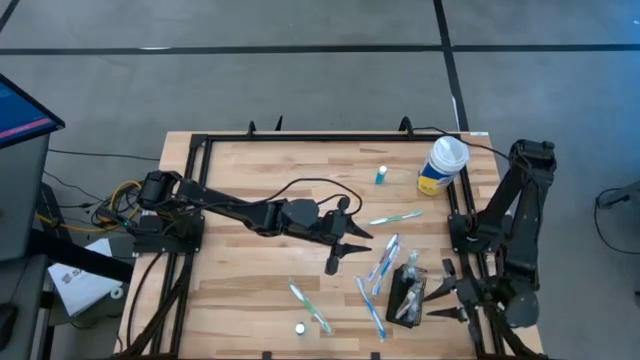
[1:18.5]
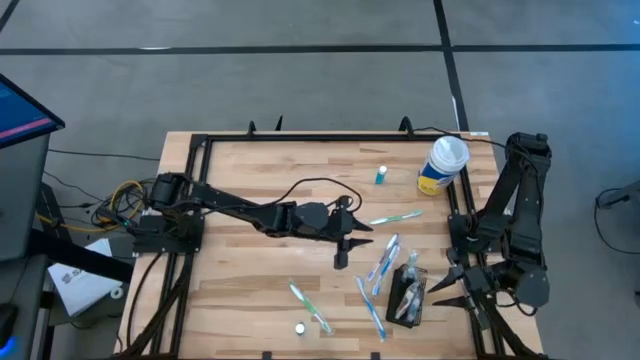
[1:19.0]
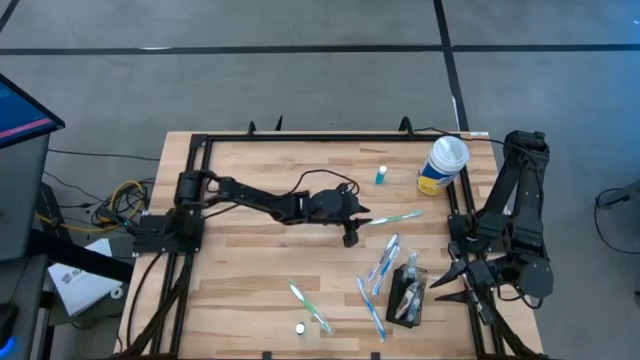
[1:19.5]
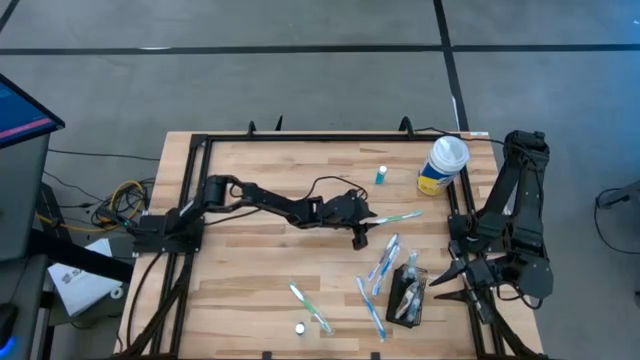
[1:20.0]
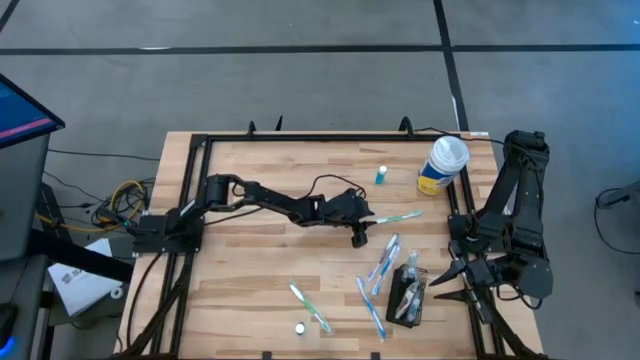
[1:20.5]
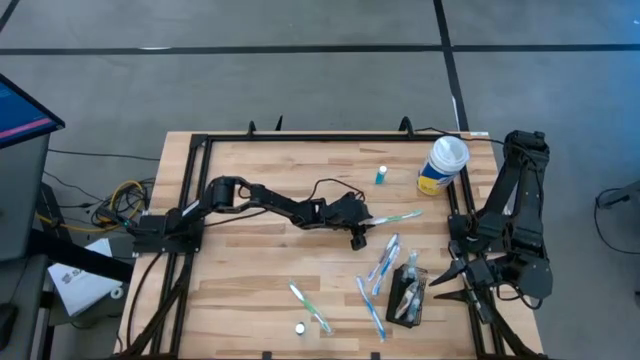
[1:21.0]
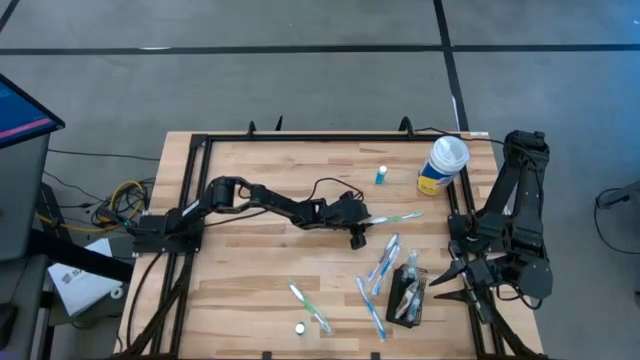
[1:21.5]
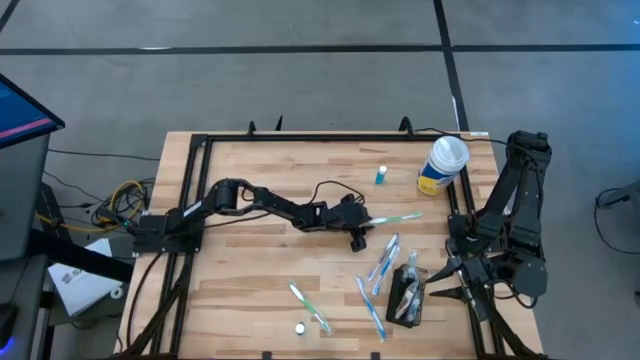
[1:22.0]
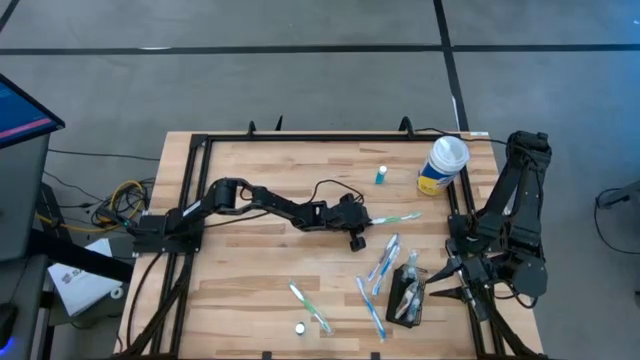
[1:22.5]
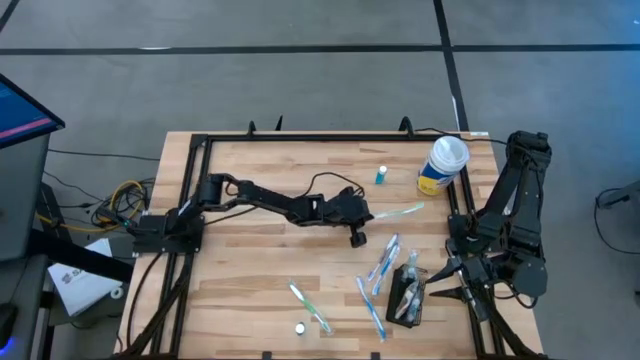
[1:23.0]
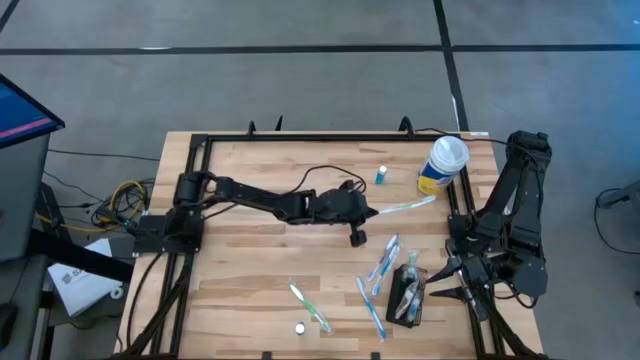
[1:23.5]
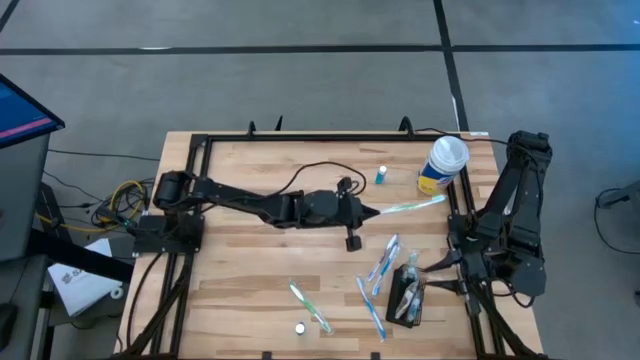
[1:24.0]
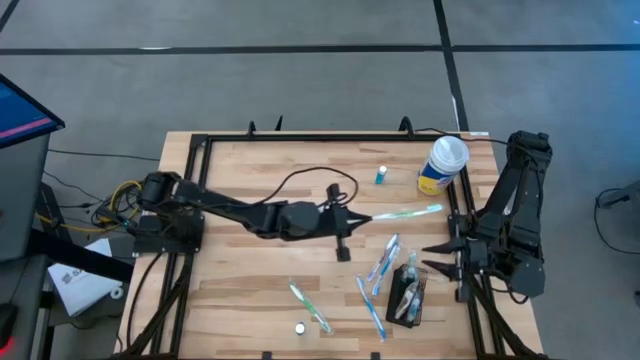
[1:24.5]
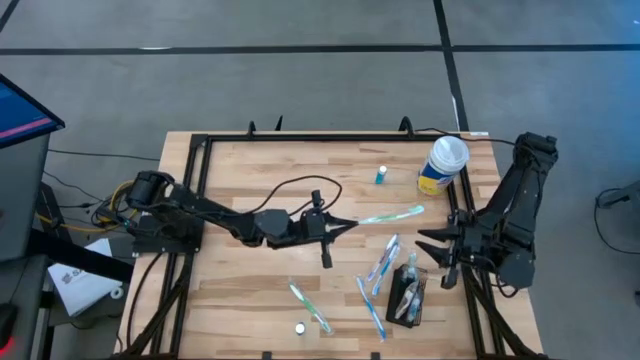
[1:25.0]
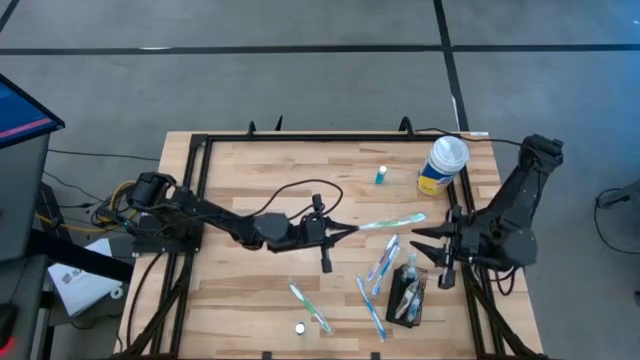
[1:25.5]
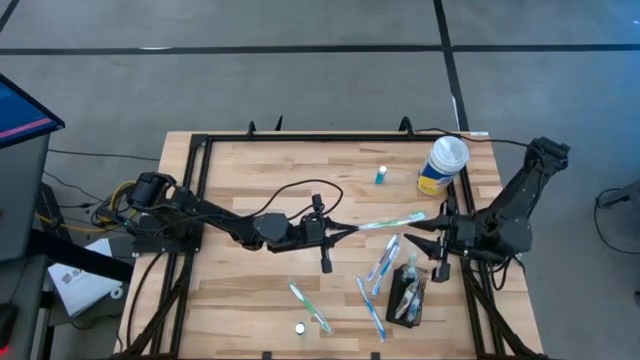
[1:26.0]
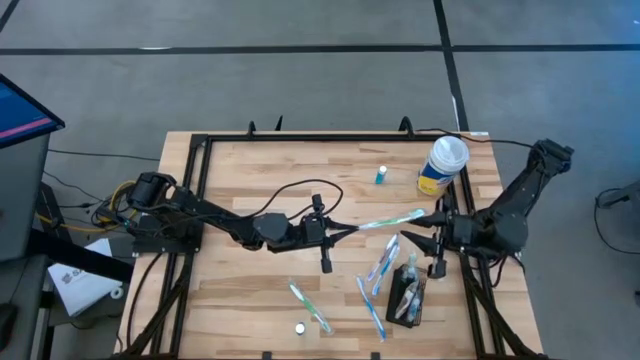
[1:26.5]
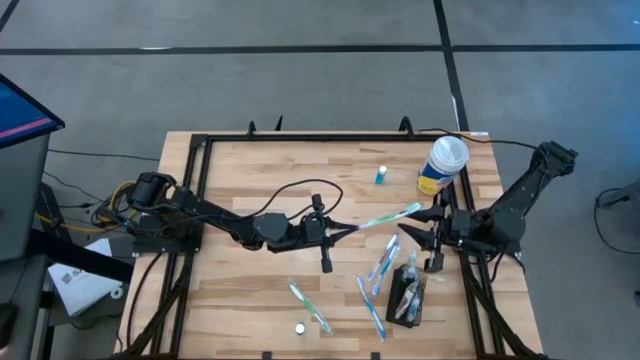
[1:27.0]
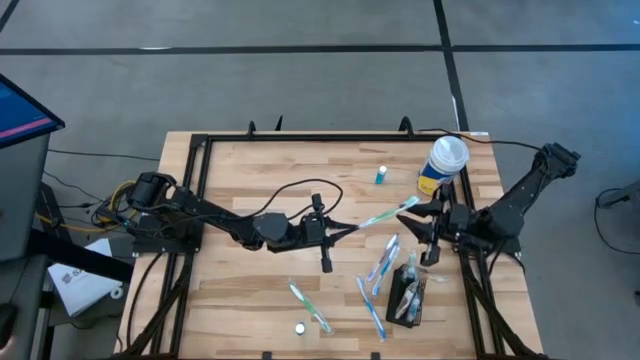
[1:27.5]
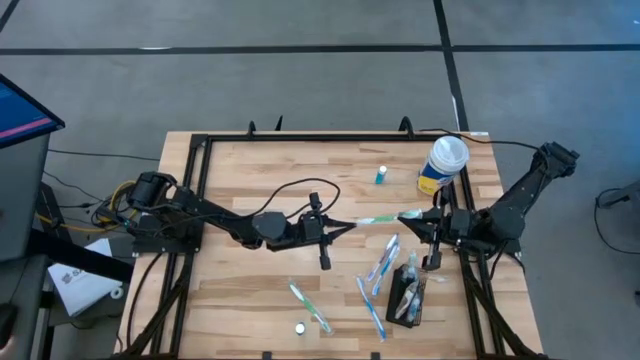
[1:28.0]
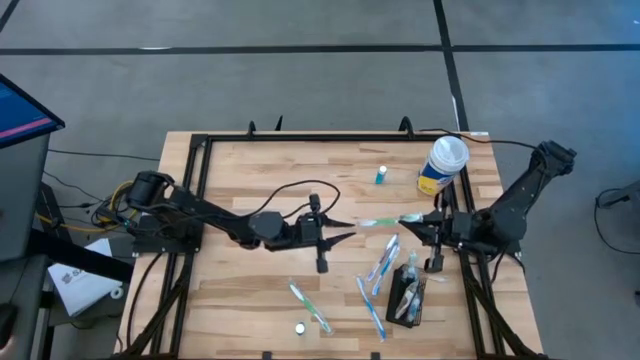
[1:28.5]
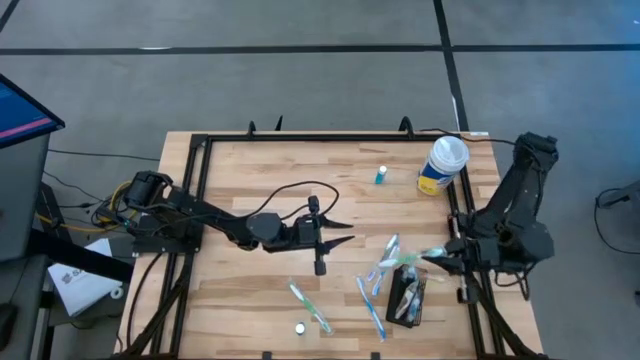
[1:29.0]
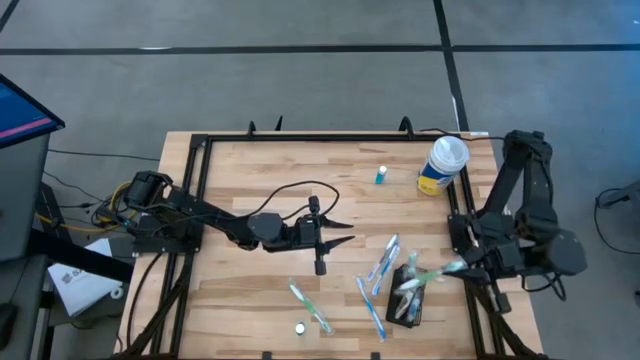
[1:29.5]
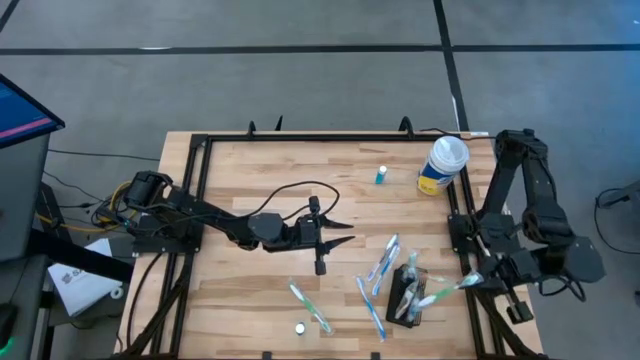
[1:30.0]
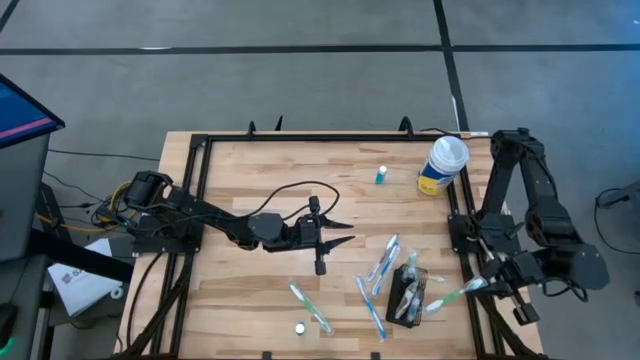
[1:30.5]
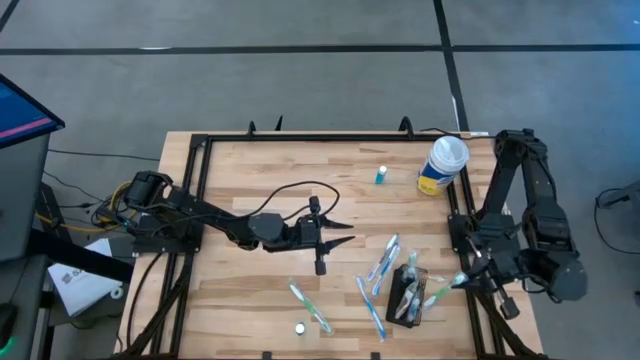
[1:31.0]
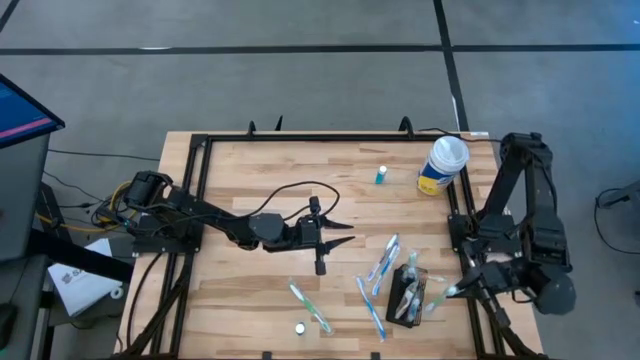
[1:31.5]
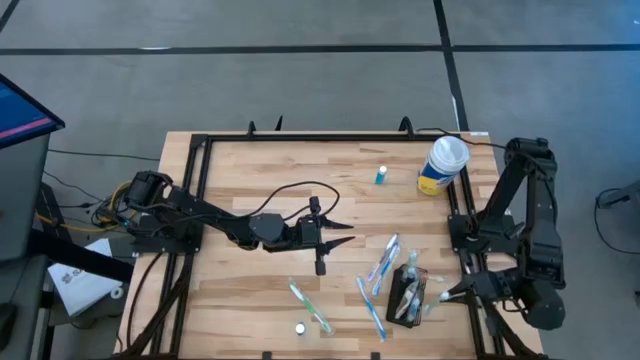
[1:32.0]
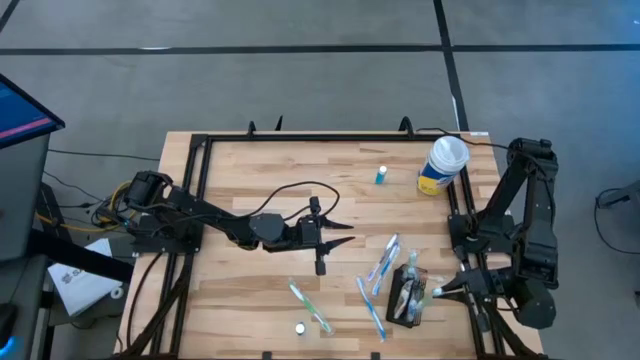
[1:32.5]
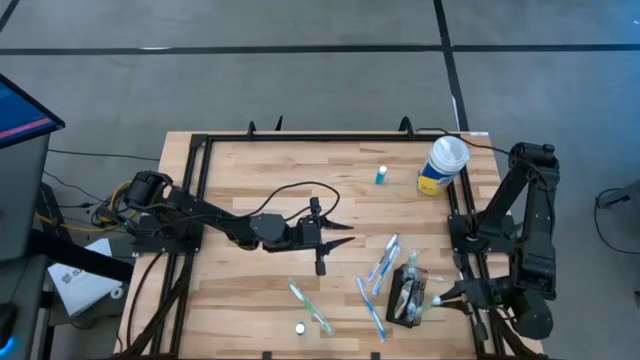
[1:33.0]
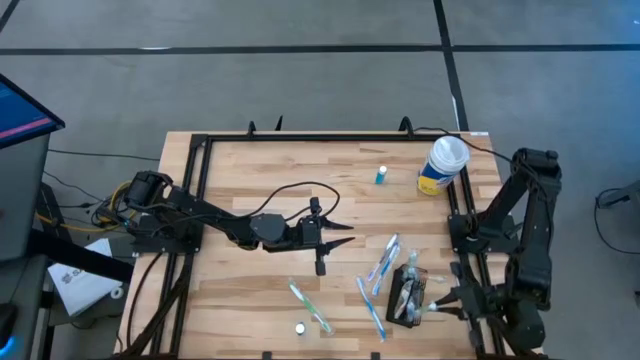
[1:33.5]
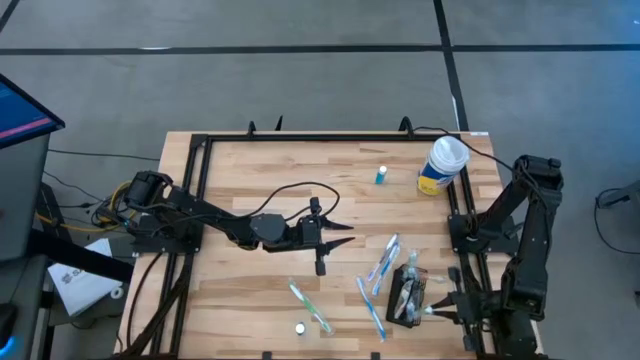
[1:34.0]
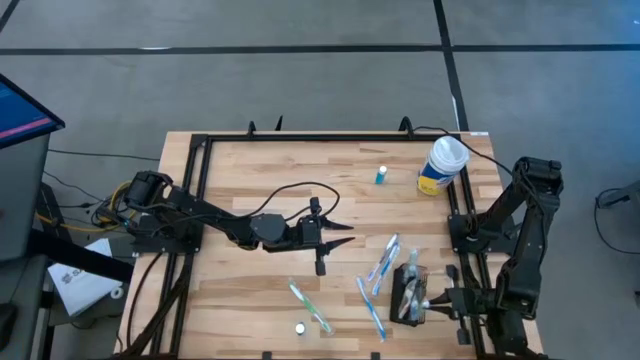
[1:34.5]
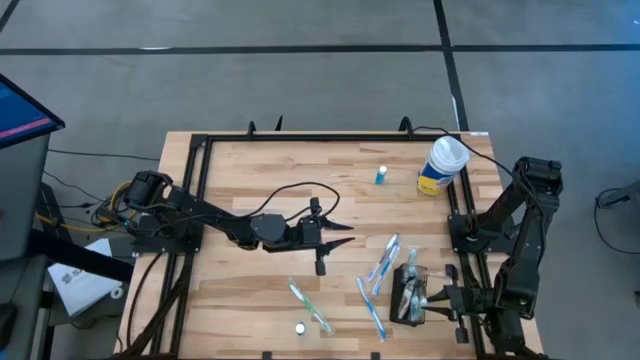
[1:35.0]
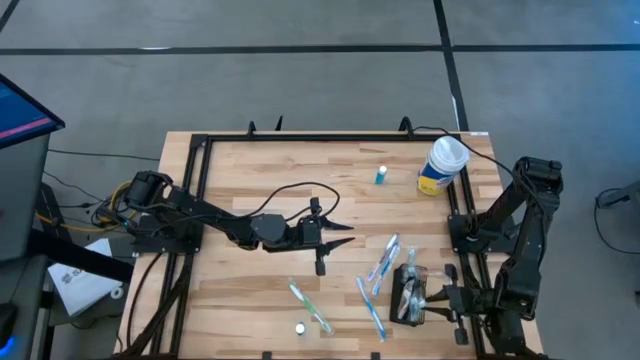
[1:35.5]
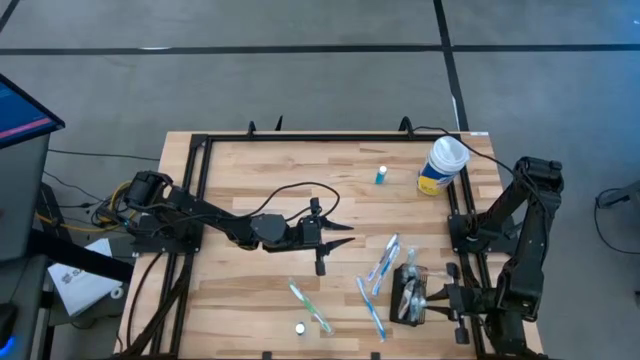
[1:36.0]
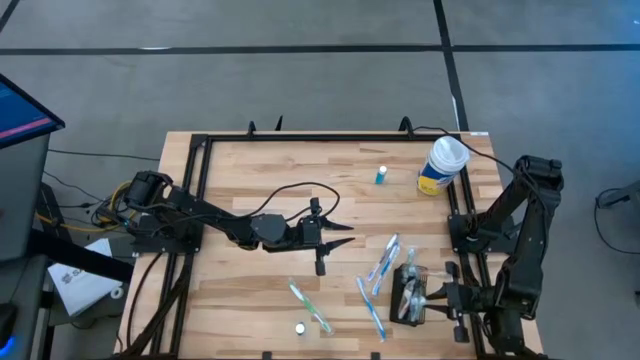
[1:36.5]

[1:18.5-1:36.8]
Task: Pick & Place toothbrushing station
Put the green toothbrush into the black wire organizer

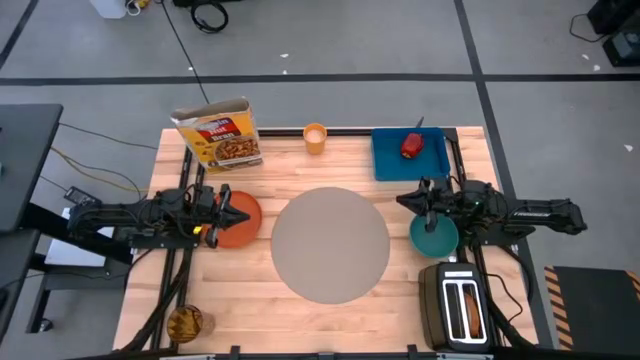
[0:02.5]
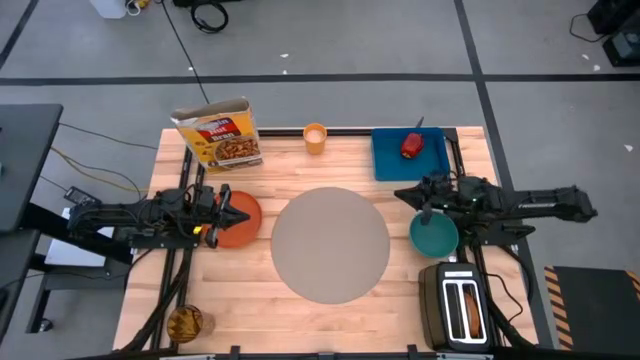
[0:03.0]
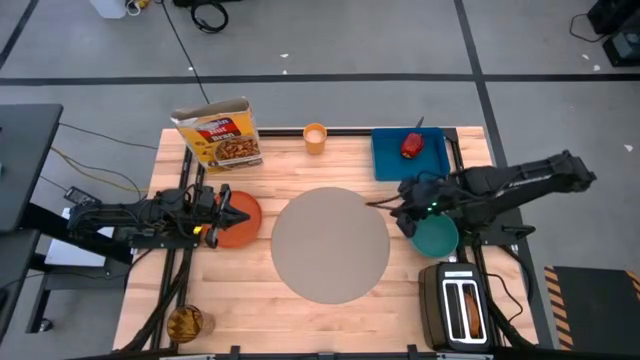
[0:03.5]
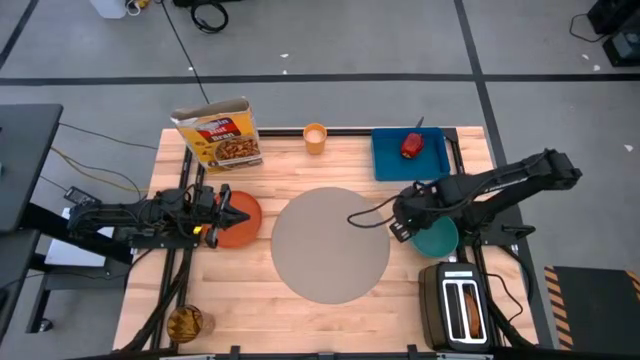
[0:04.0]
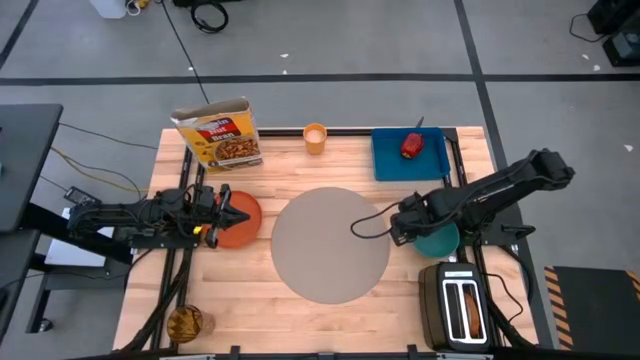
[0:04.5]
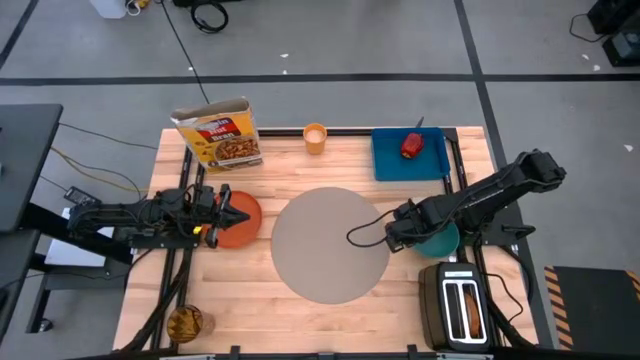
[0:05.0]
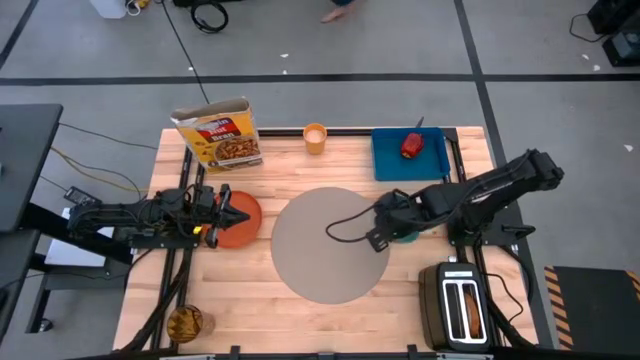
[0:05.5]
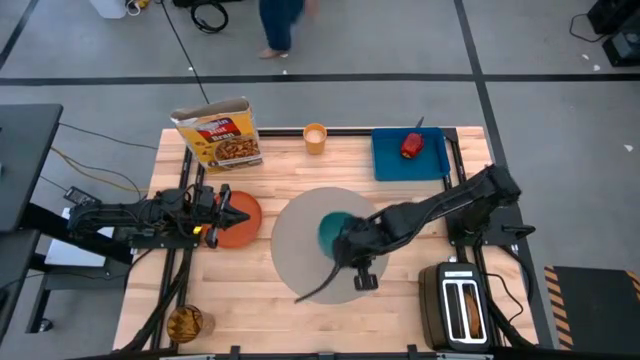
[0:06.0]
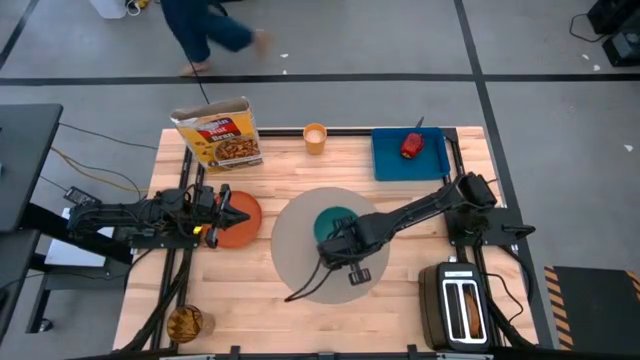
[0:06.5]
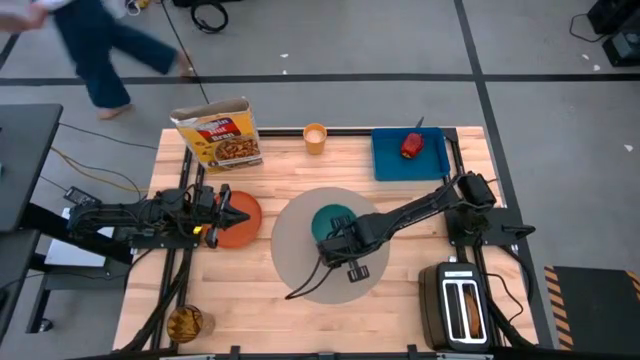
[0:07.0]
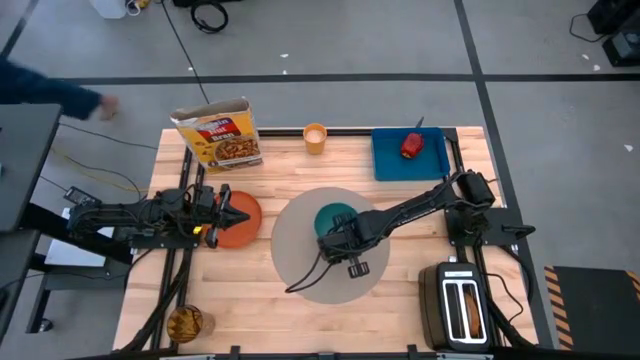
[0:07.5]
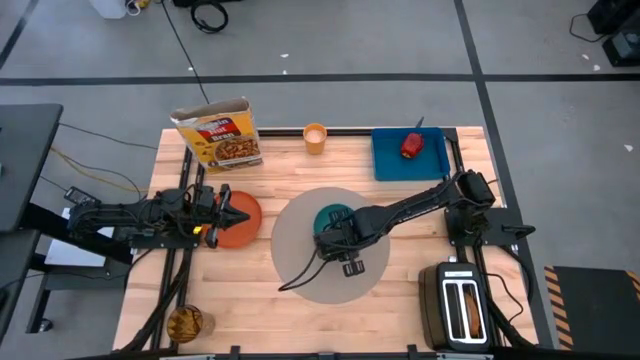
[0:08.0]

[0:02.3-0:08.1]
Task: Arrange a breakfast setting
Put the bowl at the center of the mat
